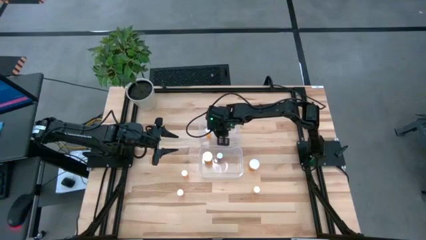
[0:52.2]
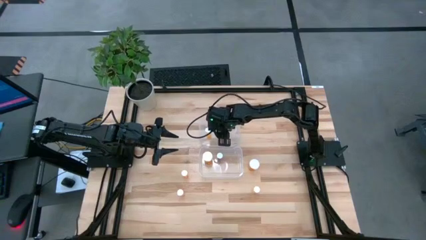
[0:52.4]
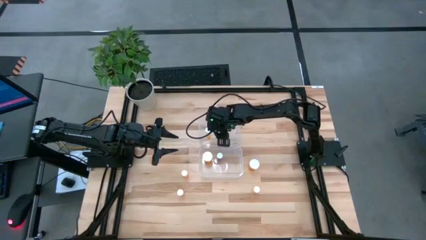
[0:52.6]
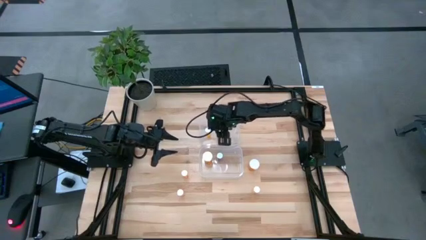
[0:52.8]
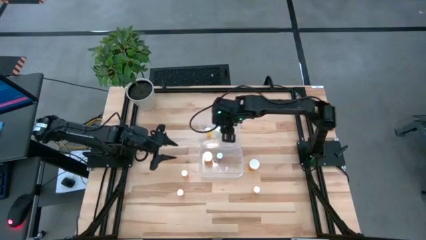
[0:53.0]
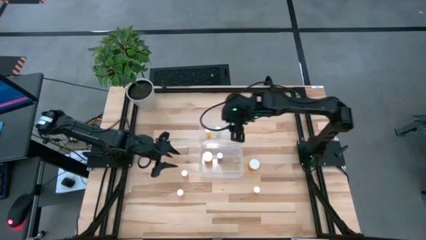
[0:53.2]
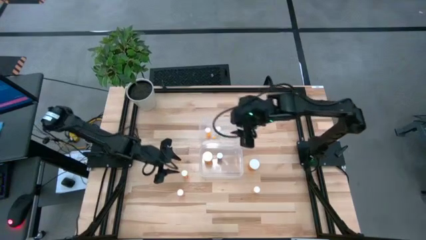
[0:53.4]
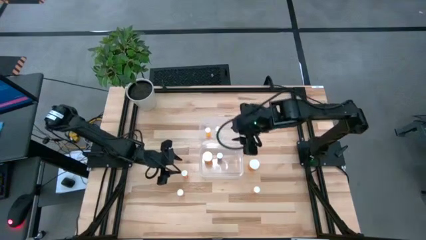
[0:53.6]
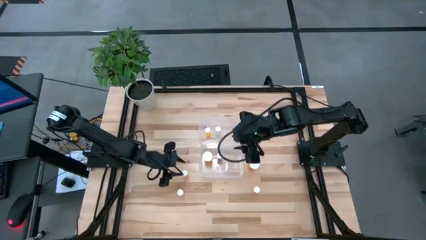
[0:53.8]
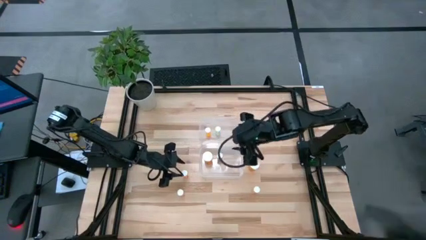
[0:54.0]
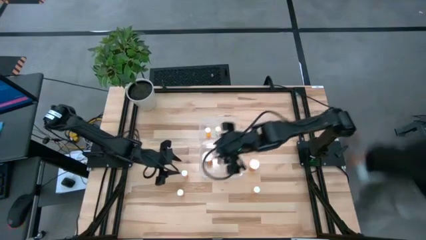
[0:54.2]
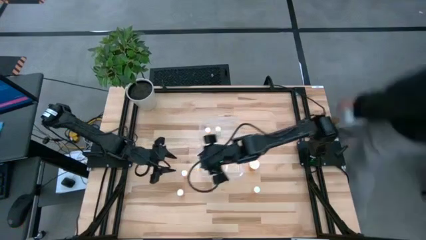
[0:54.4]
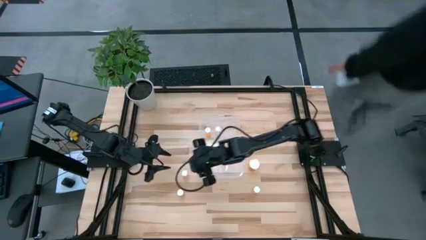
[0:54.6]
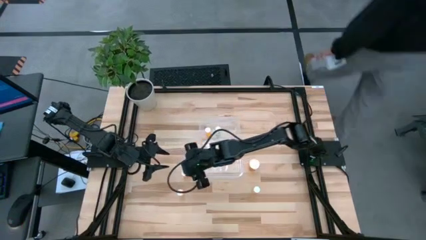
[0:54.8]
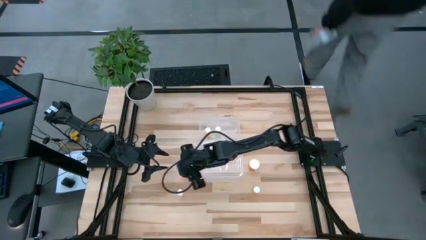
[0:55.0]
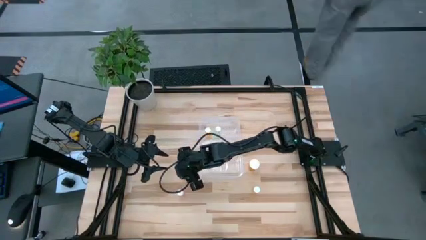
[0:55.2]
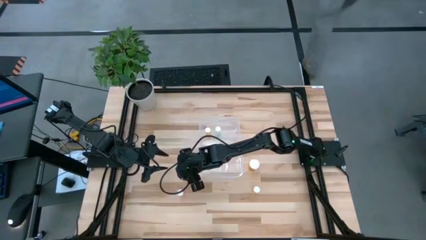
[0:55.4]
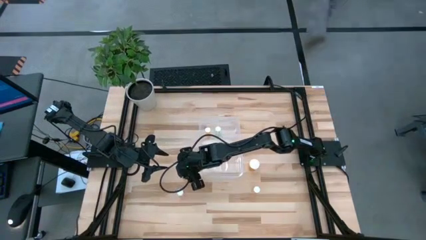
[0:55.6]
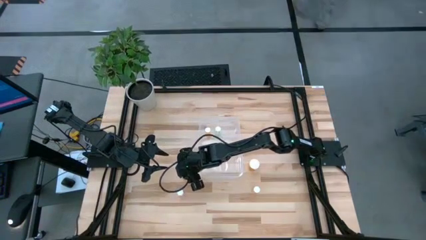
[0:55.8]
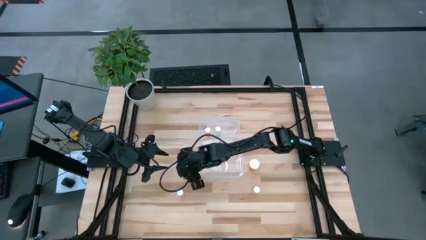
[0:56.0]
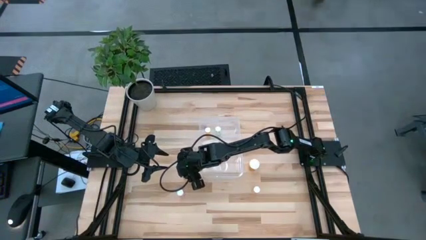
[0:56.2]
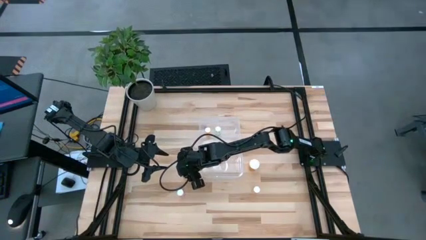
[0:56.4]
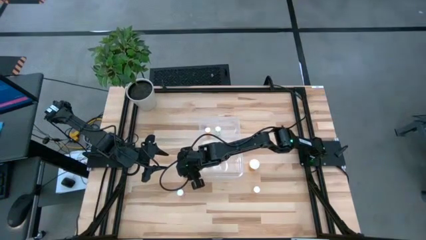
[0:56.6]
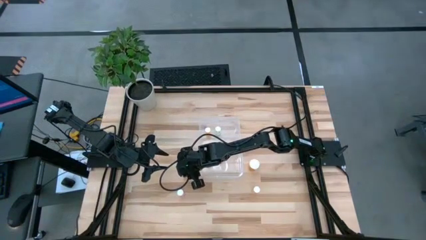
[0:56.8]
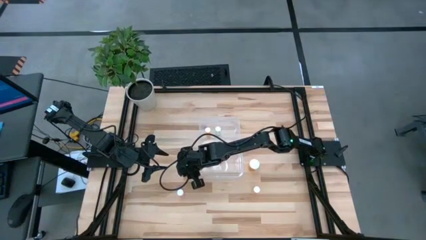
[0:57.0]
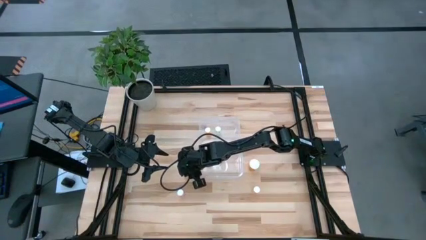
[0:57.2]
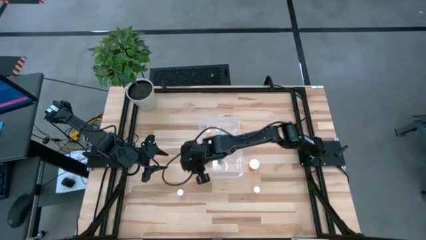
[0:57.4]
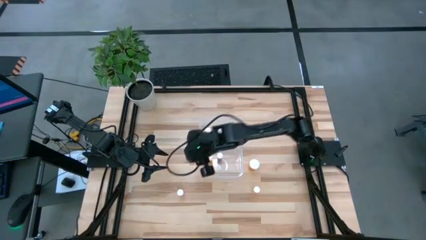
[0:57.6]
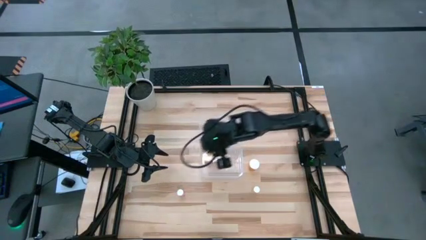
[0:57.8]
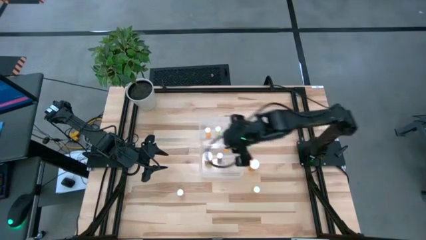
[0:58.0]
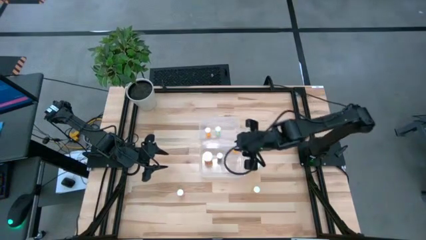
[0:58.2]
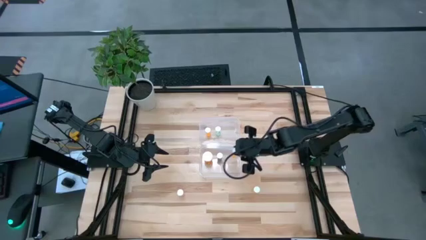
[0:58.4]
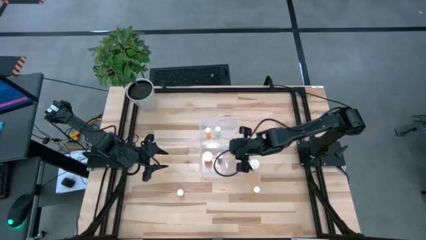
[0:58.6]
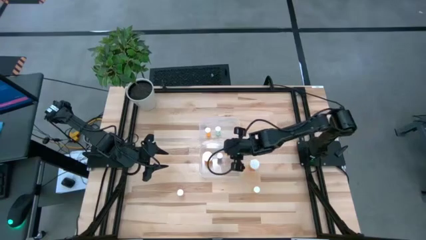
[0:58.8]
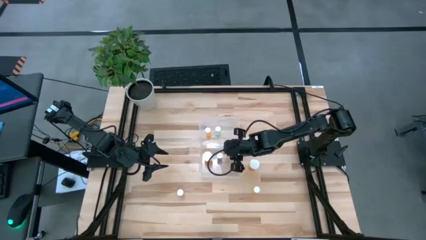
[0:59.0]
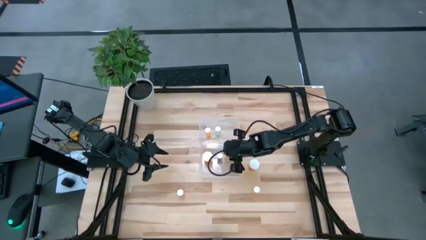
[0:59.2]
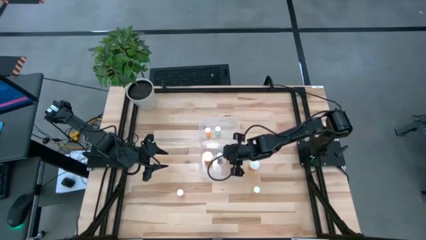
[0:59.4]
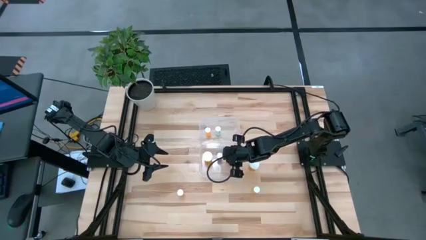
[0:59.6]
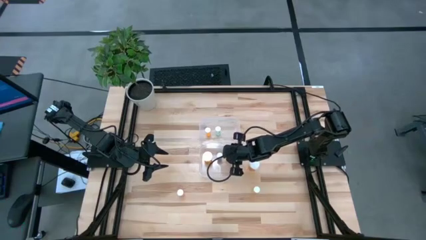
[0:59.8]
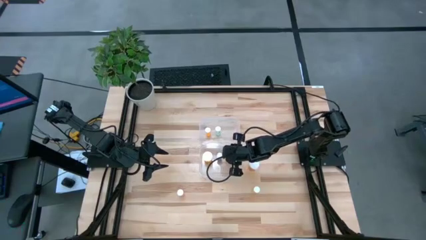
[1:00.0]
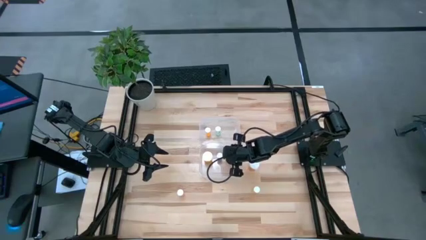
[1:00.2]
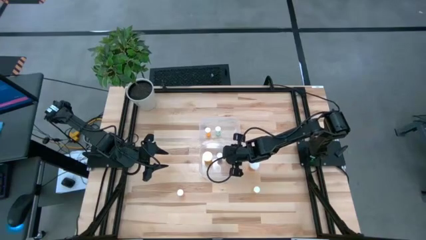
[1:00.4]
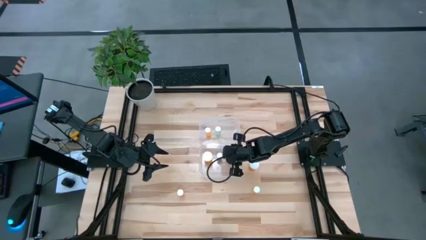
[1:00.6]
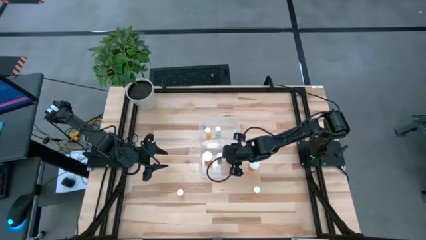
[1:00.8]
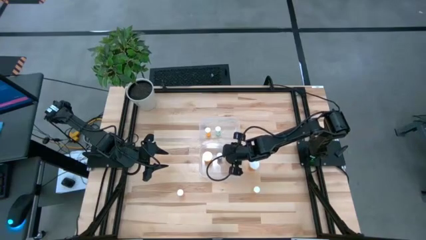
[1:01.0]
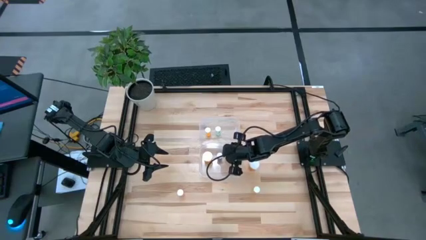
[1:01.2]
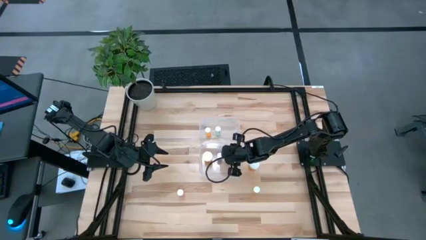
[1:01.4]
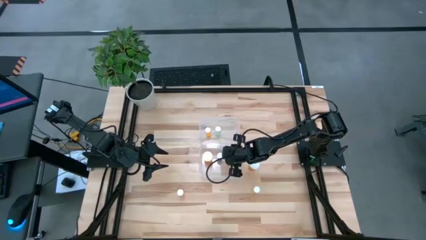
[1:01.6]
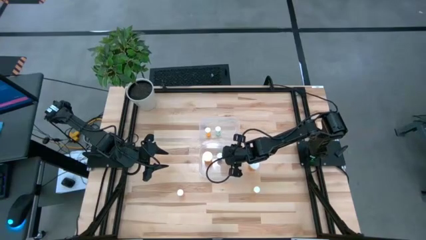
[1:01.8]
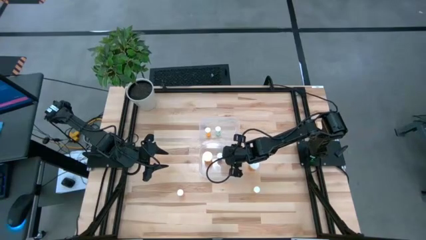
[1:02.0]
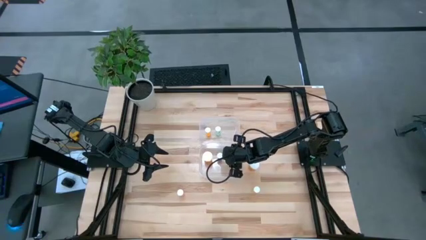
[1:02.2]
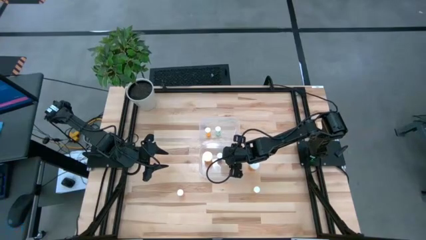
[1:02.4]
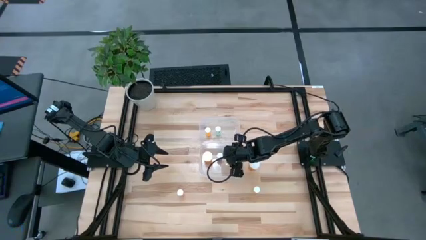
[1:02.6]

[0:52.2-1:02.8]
Task: Pick and place medicine bottles into bin by pill shape (circle, oval)
Put the orange capsule bottle into the bottom transparent bin

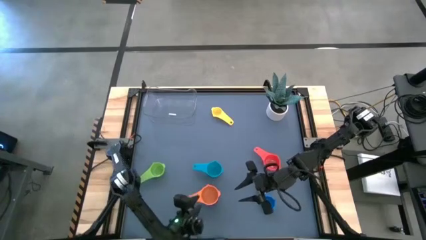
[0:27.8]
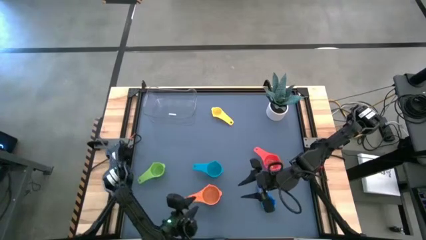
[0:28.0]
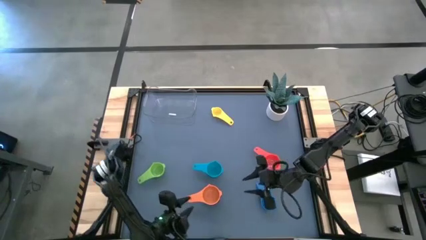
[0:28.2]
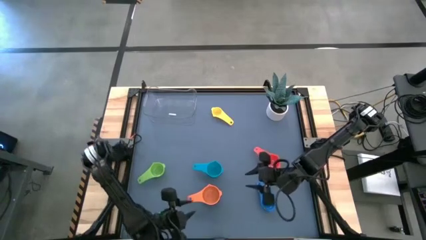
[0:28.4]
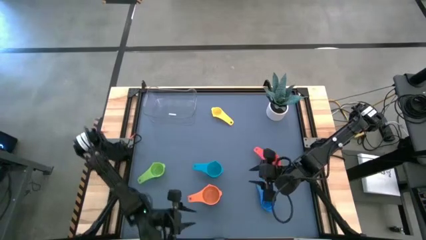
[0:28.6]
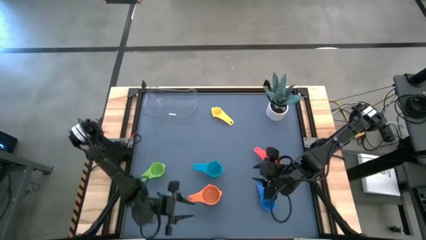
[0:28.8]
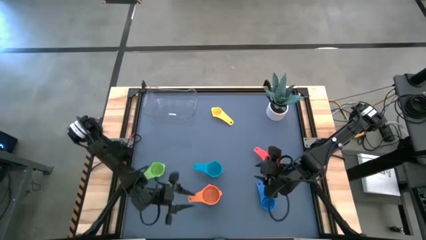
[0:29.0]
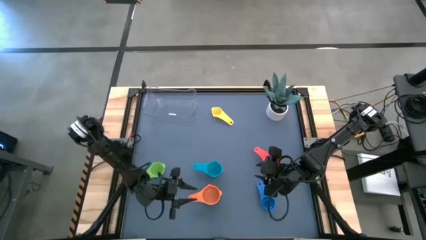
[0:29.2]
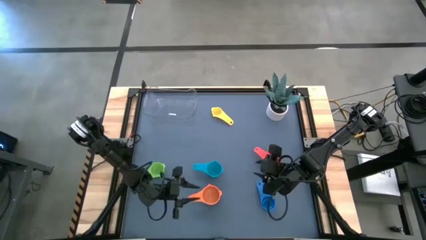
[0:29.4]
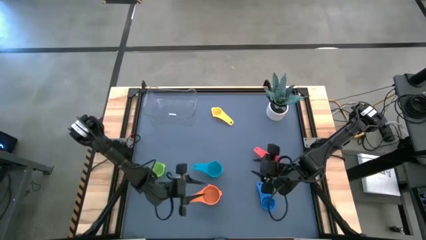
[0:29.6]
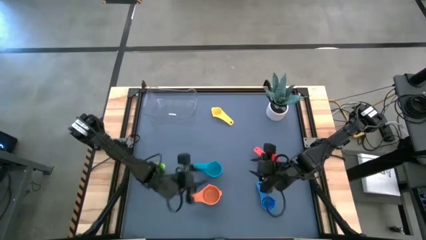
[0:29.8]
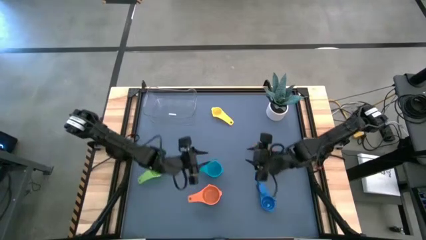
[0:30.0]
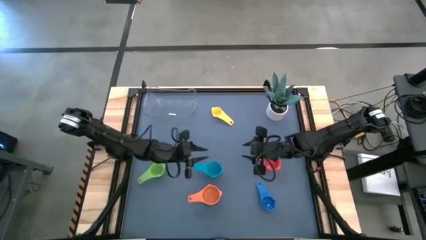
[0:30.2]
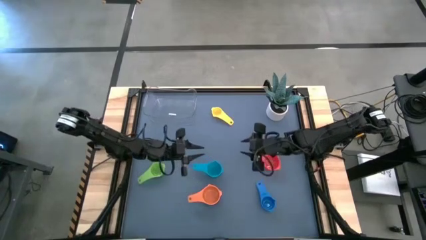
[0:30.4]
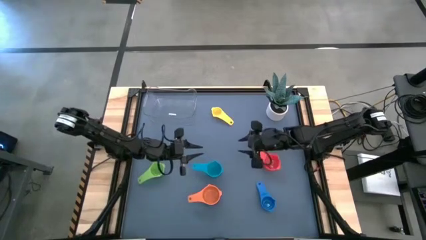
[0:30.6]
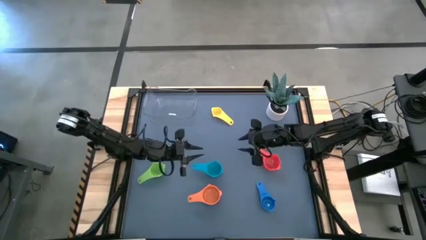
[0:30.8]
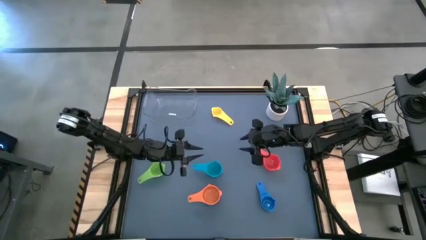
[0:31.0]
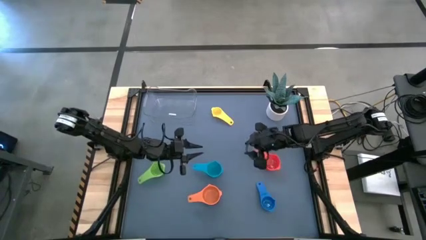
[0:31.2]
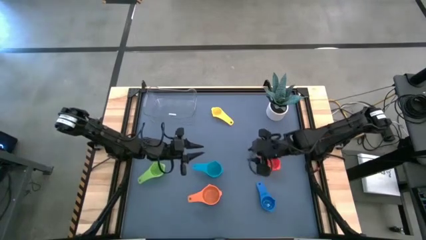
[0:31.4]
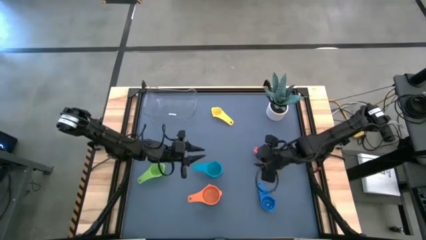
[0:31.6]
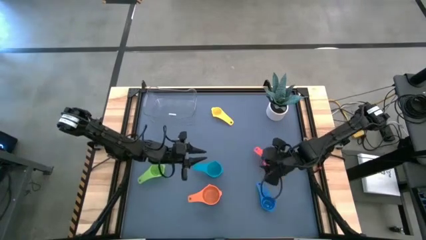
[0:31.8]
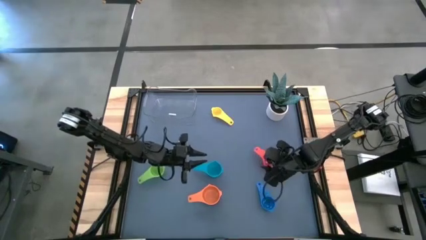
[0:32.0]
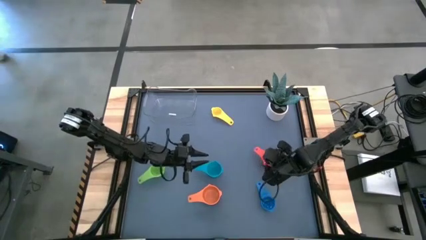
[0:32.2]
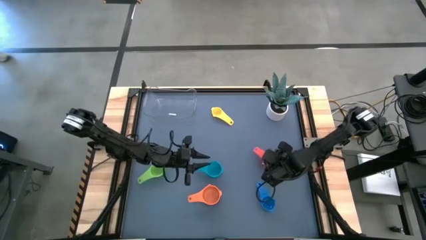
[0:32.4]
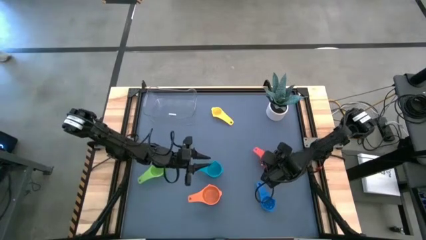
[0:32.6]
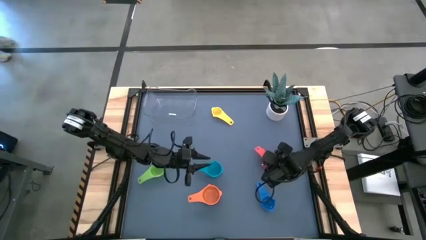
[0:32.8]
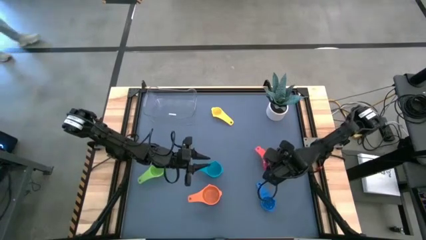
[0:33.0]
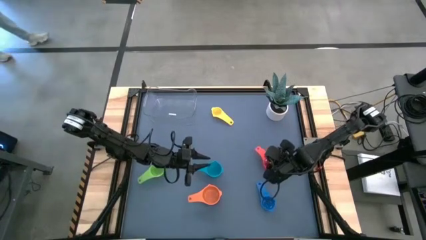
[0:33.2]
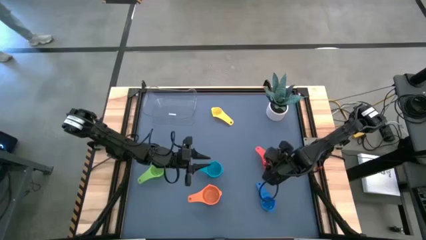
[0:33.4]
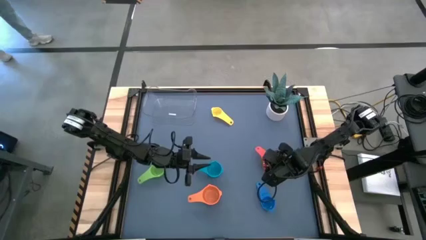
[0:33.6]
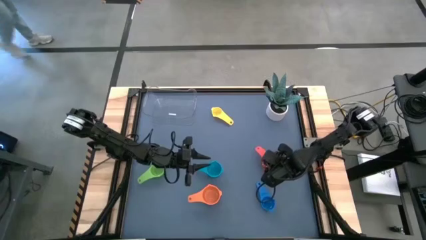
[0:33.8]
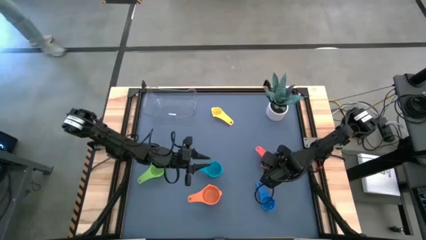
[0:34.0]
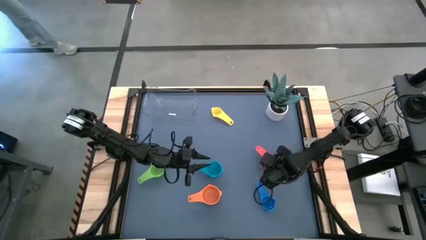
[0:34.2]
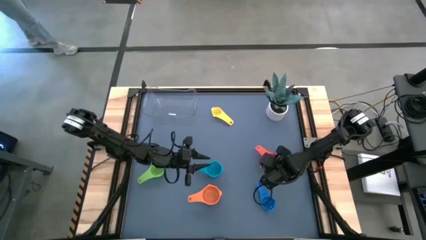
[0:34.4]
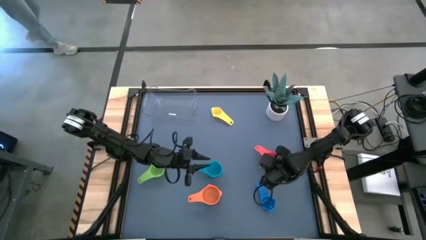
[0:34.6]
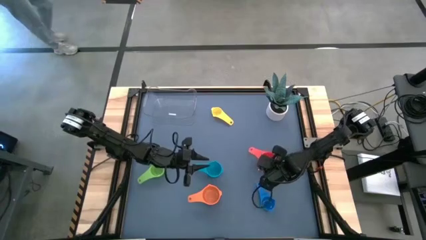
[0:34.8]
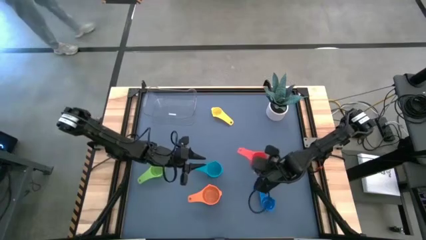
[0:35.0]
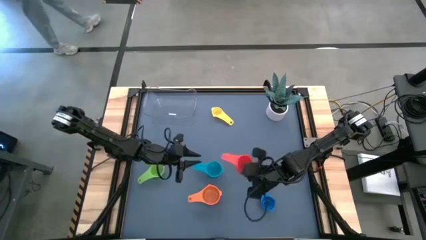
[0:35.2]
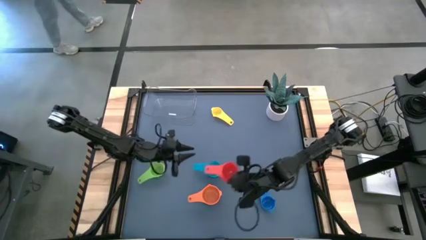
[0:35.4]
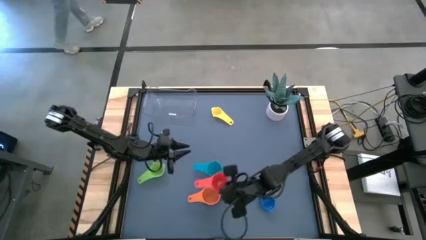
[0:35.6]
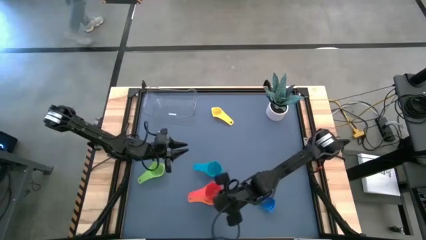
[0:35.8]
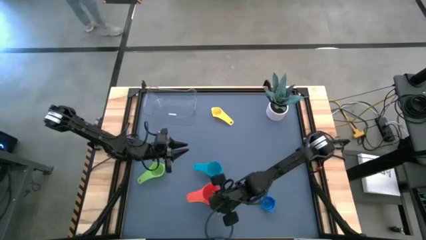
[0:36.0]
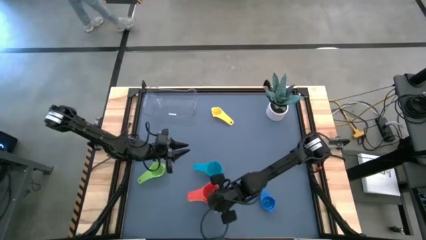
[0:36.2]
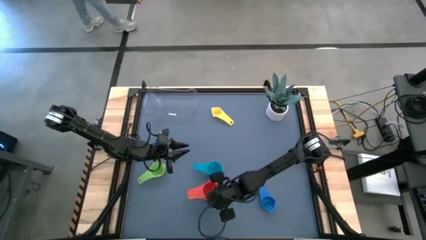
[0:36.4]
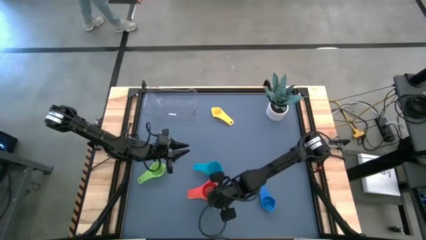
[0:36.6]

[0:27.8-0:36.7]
Task: Nest measuring cups in basket
Stack the red measuring cup on top of the orange measuring cup
